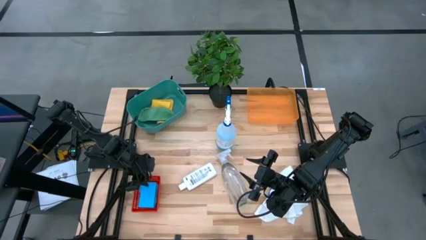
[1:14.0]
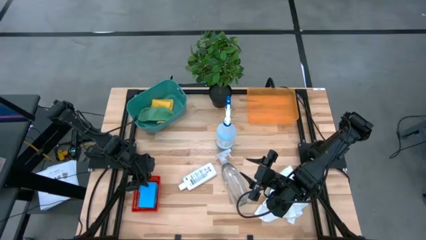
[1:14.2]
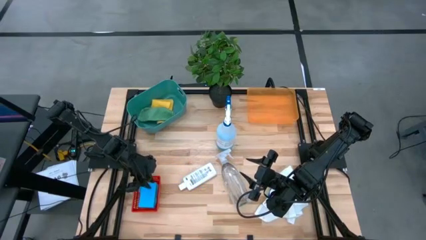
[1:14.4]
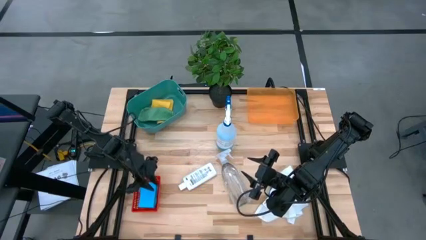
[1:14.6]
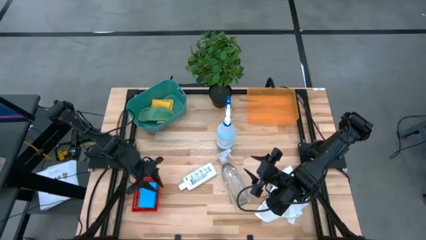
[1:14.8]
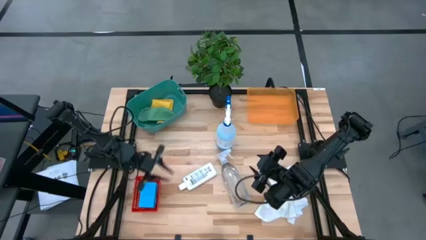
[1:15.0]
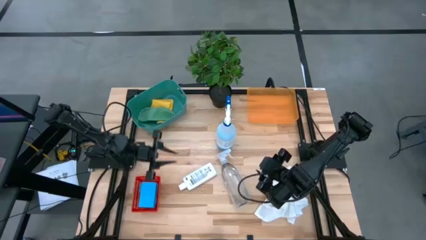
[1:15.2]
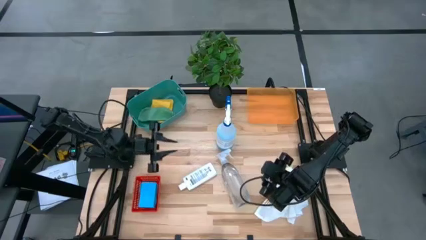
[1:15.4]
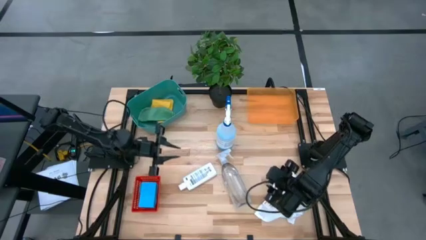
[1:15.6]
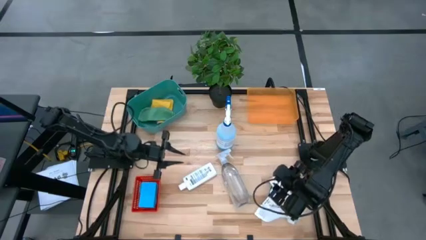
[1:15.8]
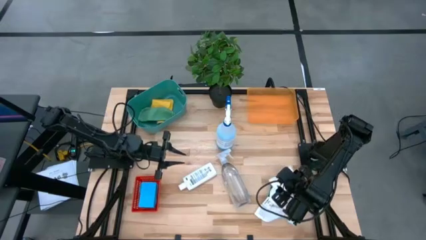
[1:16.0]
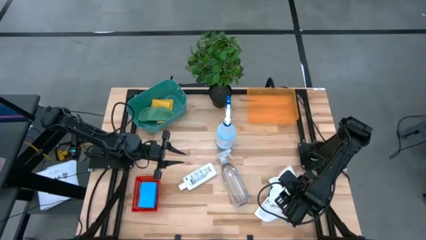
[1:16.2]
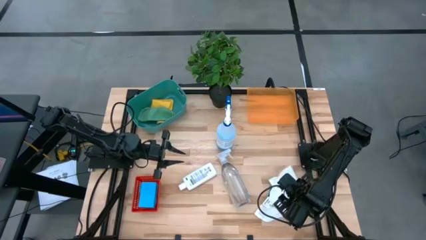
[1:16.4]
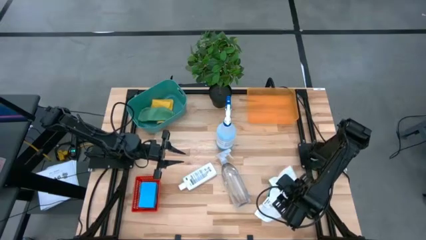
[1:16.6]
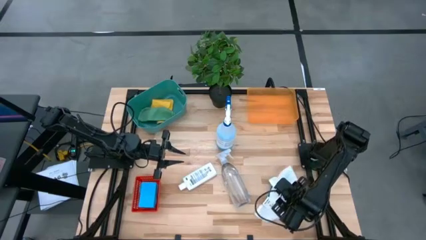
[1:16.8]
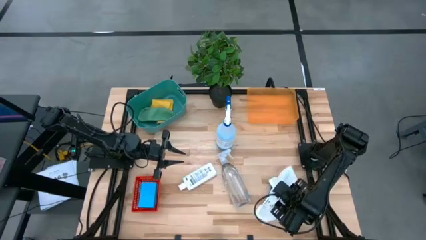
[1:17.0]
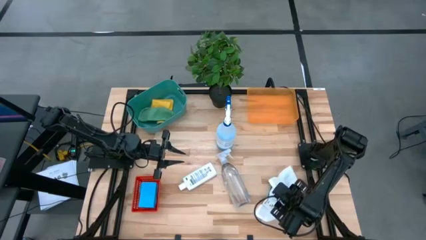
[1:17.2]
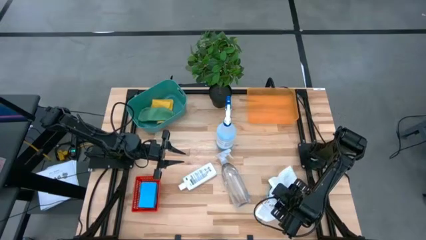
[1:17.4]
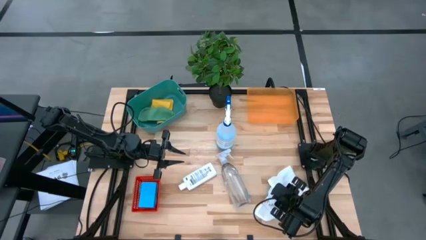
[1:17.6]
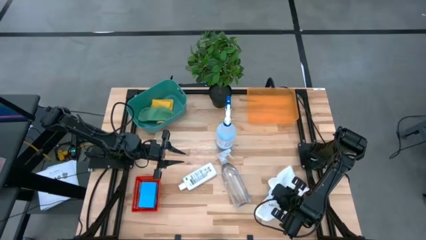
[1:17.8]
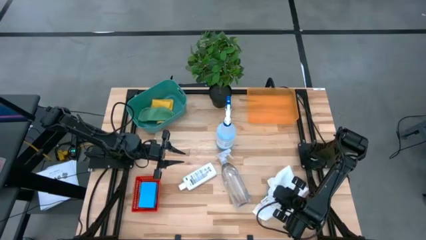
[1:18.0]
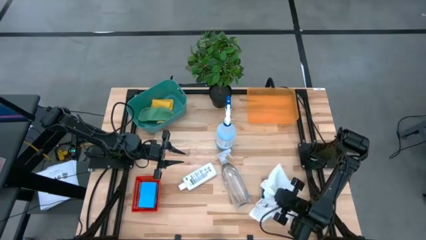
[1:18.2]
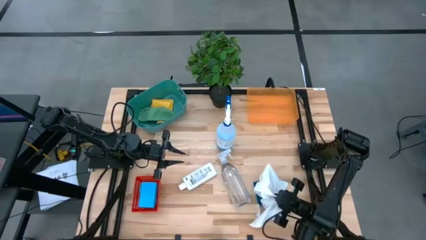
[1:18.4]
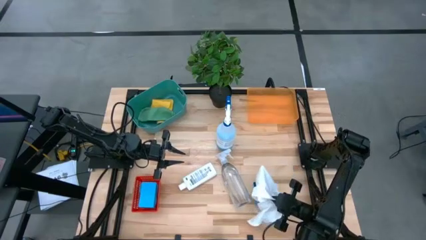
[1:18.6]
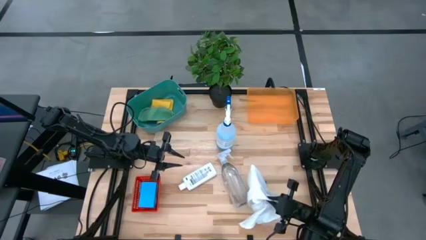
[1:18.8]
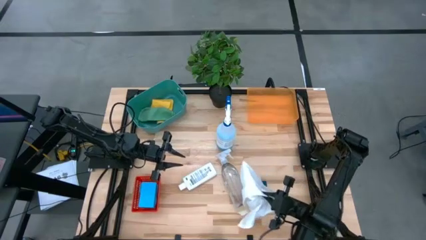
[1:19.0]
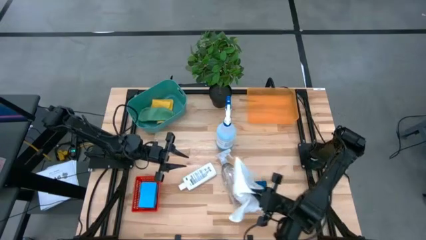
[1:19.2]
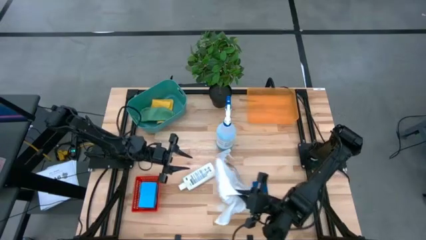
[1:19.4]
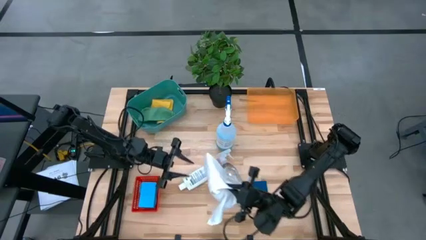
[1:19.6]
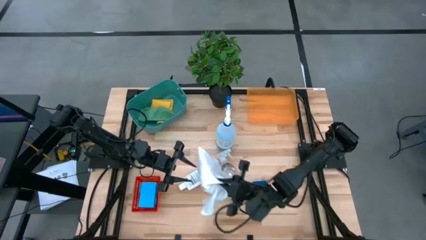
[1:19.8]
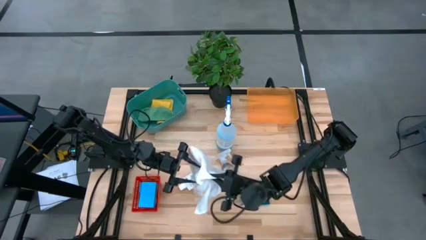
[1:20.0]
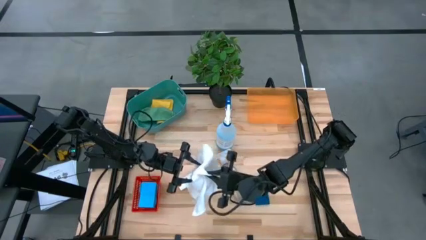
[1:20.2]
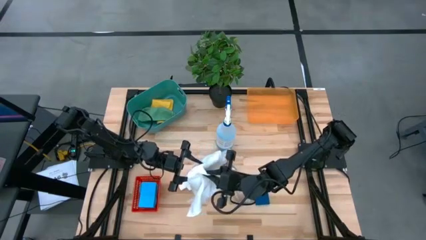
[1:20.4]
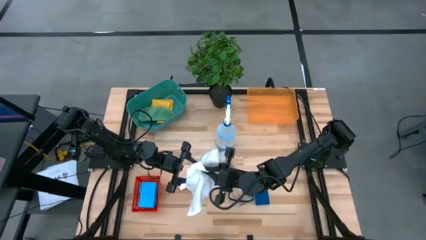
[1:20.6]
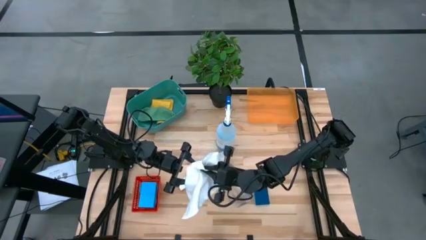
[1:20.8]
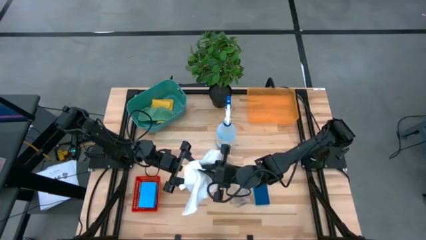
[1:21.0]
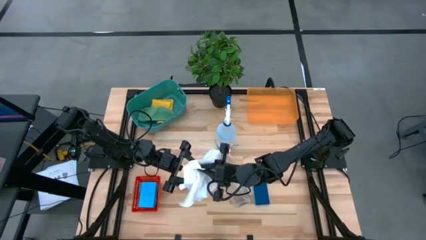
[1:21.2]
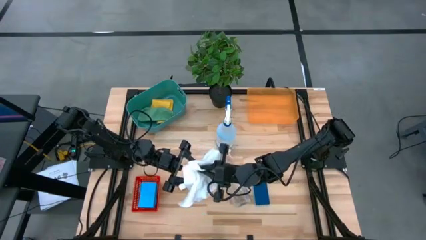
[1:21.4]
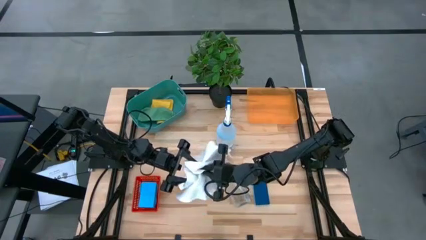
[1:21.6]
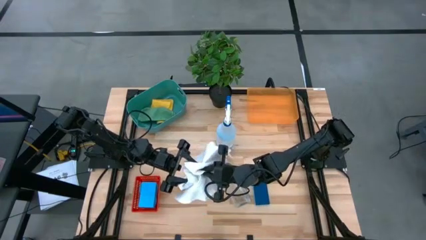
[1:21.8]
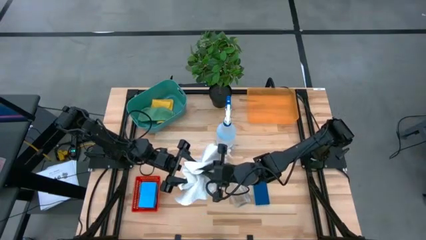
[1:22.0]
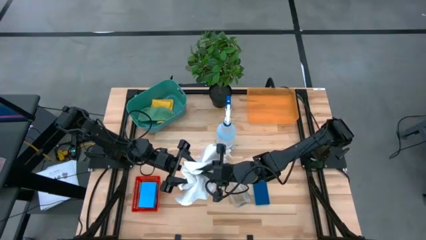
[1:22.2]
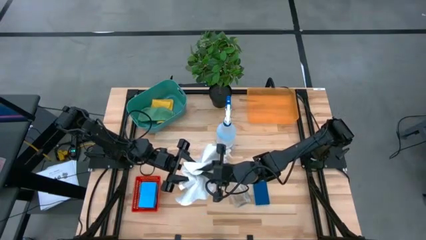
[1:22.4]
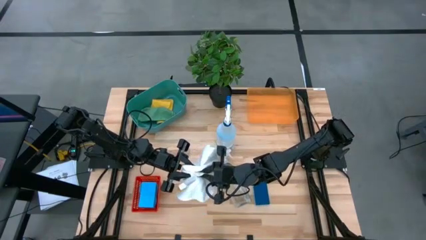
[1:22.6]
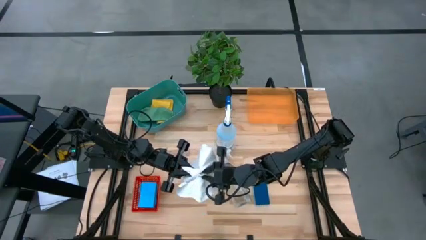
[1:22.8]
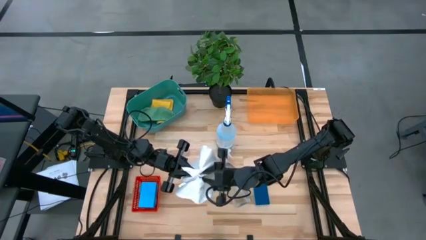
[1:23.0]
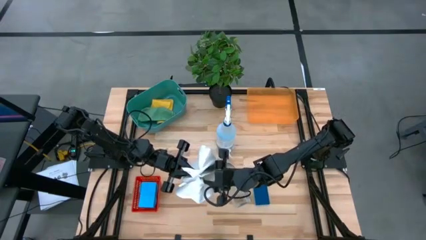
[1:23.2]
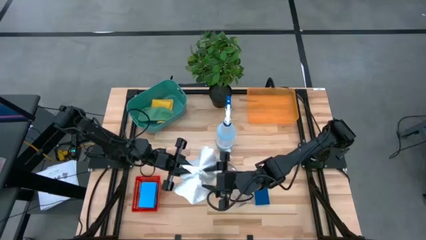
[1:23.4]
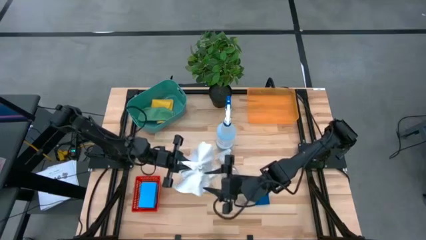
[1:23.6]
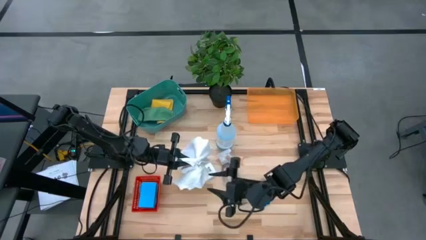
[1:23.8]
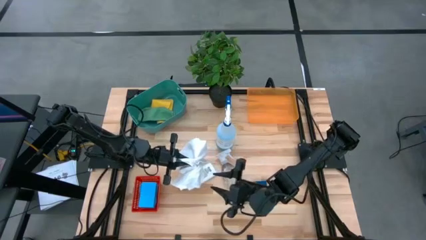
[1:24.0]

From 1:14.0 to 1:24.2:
Task: Pick & Place Kitchen Items
Put the white towel into the green bin

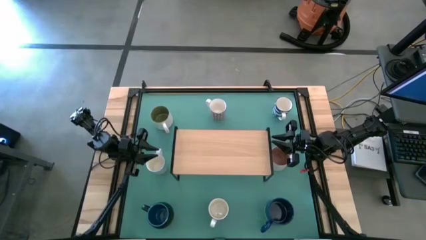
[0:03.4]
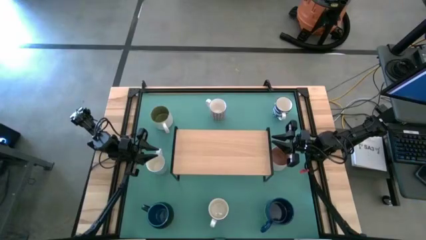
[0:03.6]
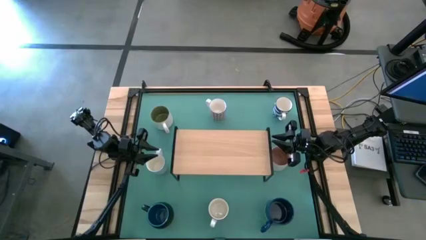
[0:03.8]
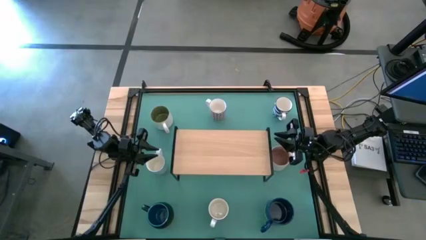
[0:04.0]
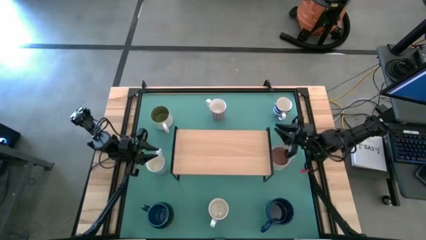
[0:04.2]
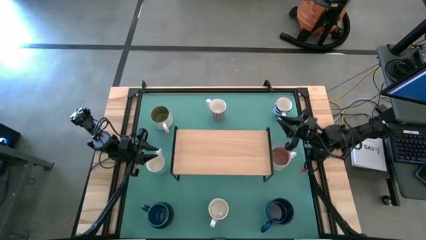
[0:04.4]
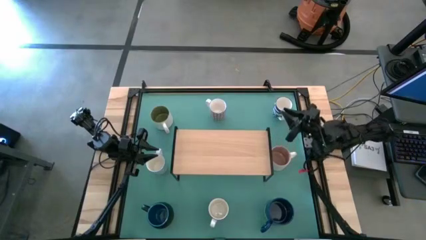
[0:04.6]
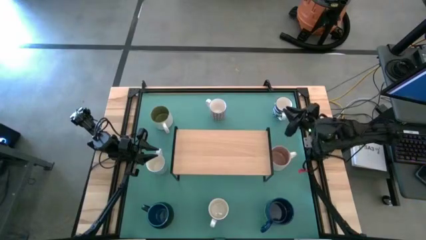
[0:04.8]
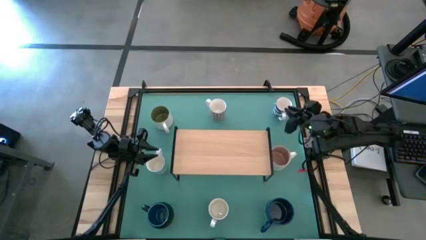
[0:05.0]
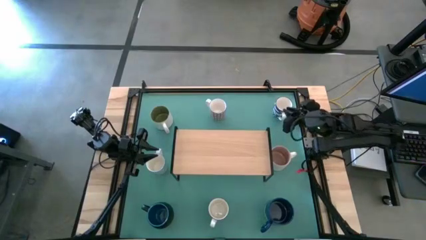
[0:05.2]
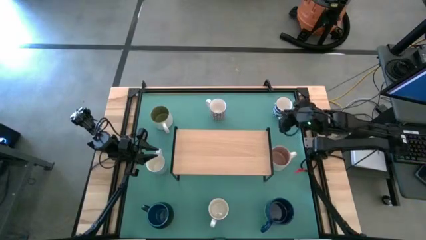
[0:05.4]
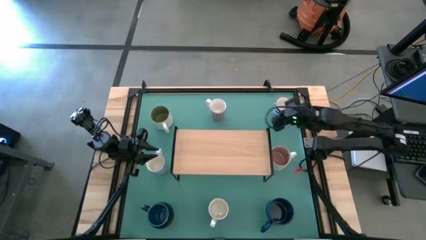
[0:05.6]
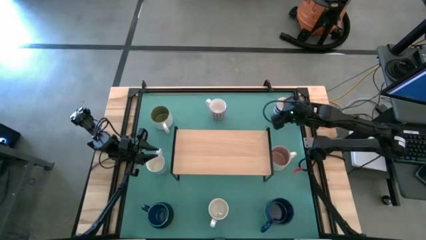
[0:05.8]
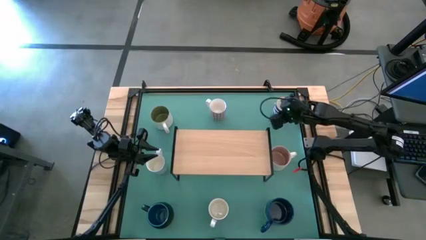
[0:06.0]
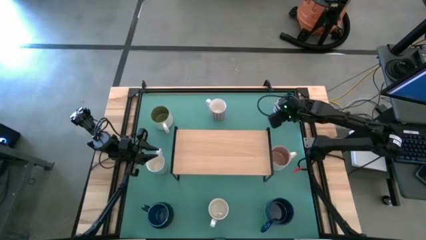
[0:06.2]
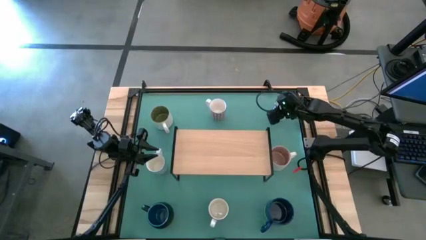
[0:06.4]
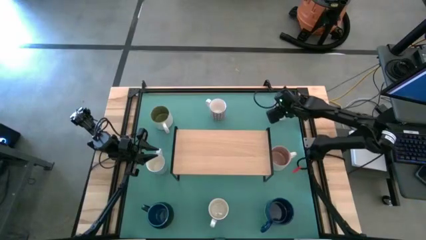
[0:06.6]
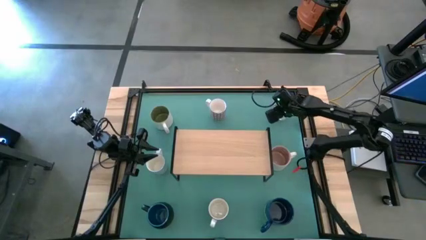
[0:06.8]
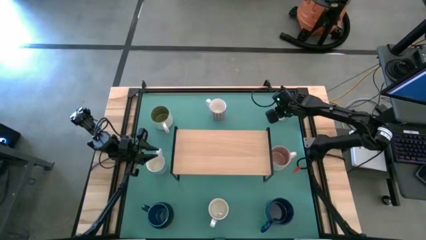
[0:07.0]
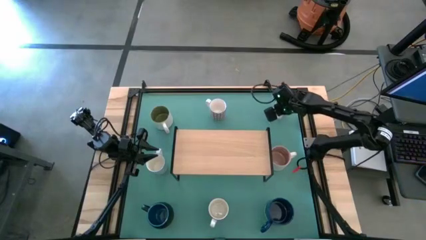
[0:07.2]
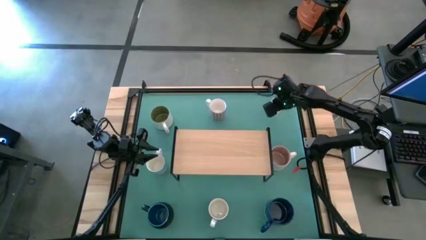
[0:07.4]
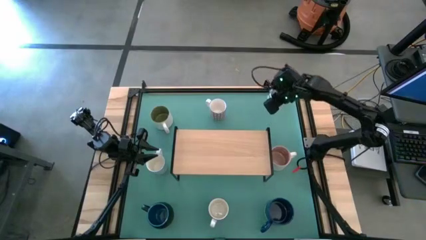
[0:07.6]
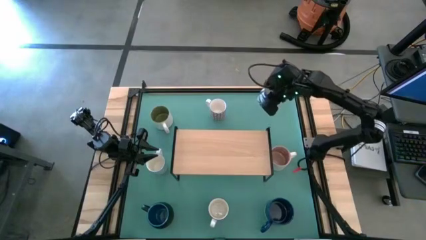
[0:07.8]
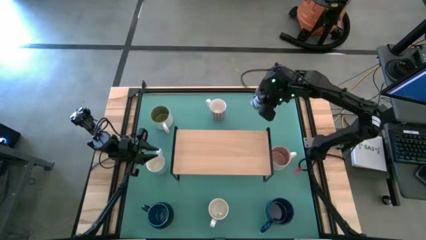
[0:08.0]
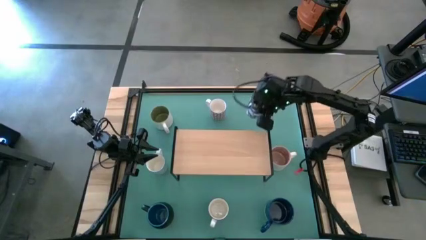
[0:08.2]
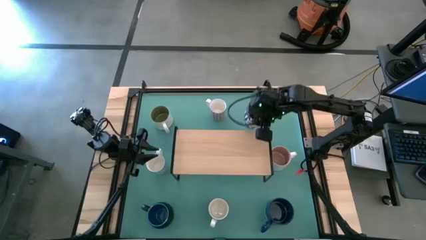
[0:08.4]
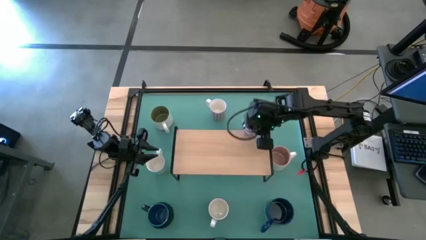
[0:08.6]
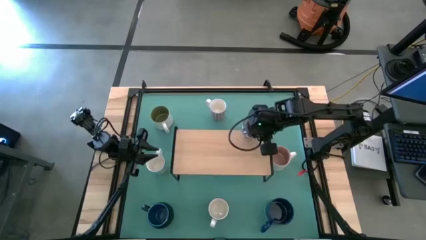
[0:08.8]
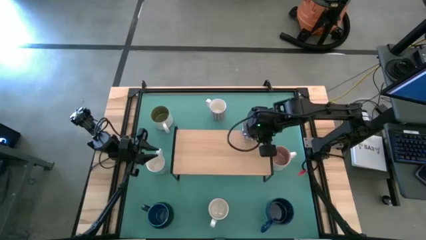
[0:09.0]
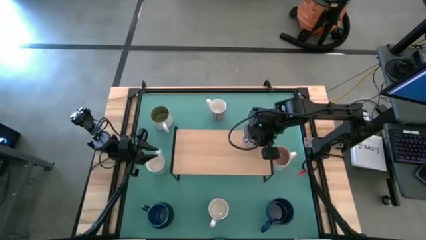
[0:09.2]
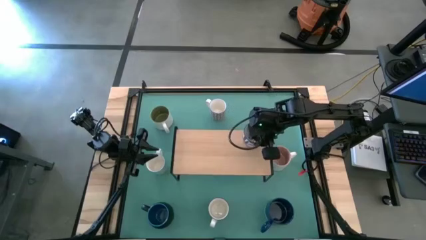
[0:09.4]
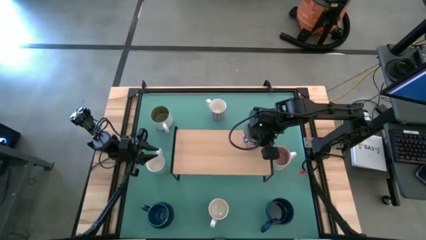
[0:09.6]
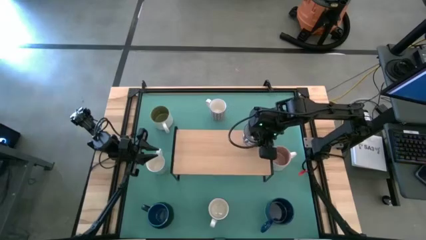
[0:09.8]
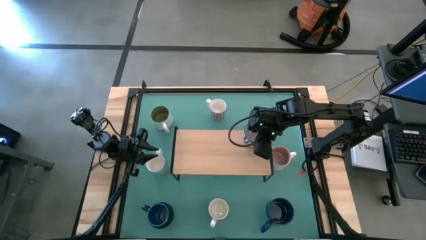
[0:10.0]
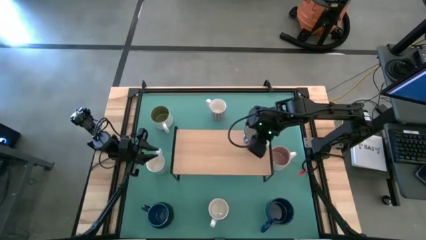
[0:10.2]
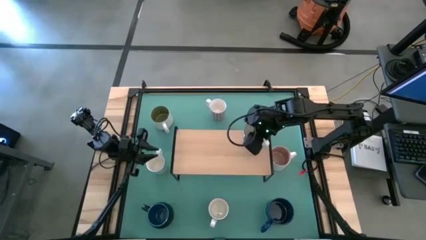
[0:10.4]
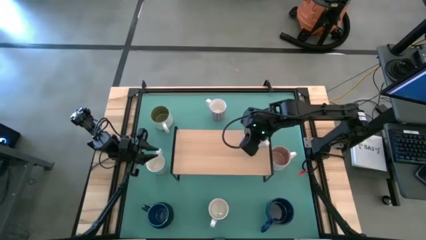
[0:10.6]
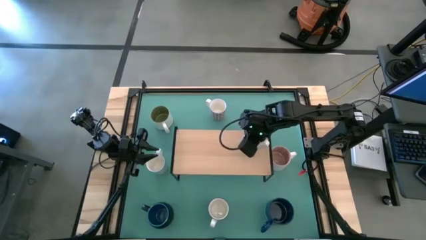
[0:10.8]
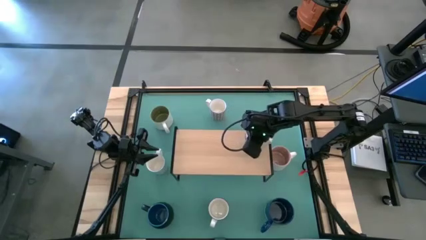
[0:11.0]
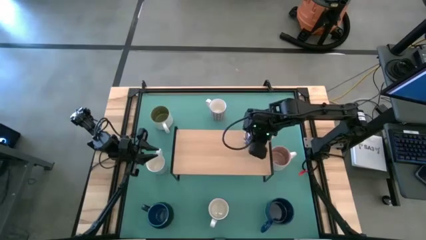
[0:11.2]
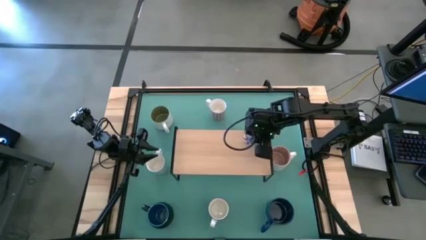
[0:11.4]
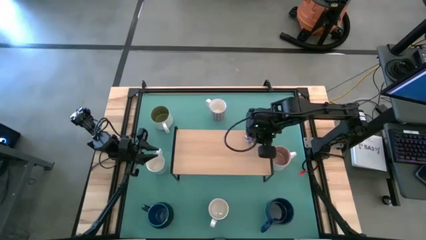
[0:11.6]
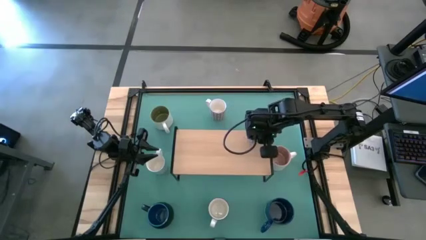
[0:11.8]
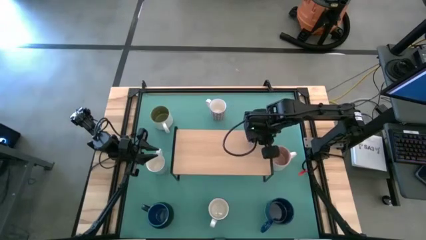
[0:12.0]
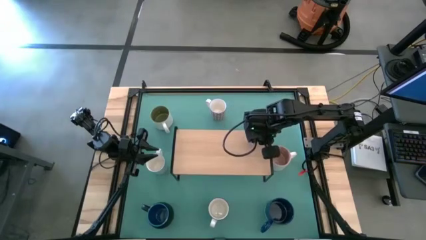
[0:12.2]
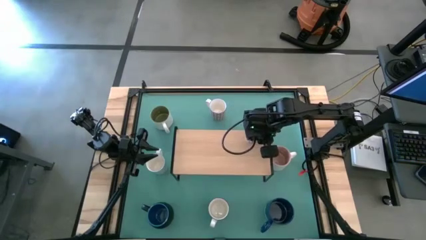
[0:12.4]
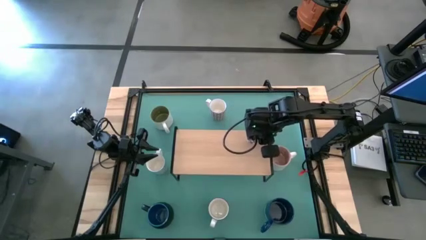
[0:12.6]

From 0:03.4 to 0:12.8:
Task: Place coffee mugs
Put the top blue patterned mug on the shelf
